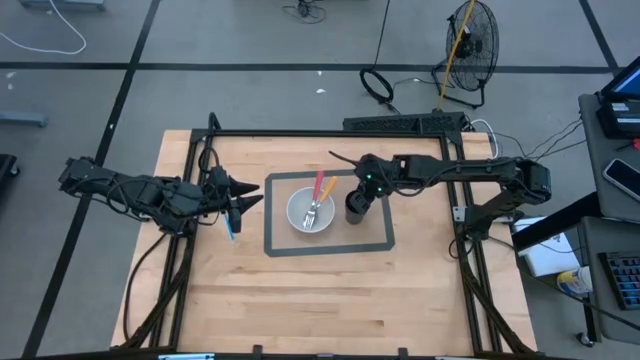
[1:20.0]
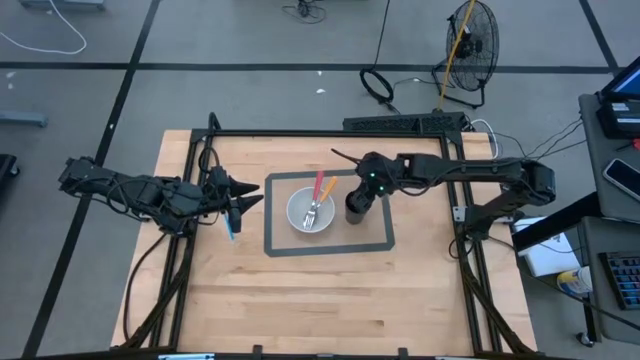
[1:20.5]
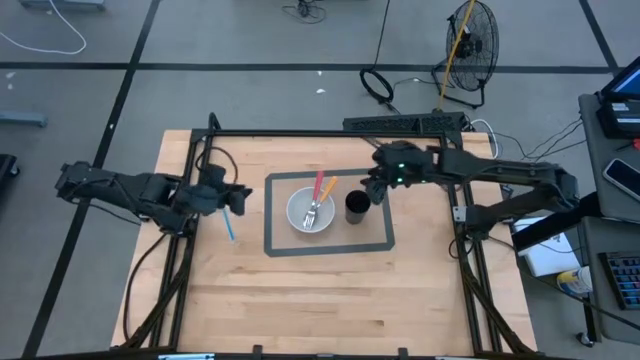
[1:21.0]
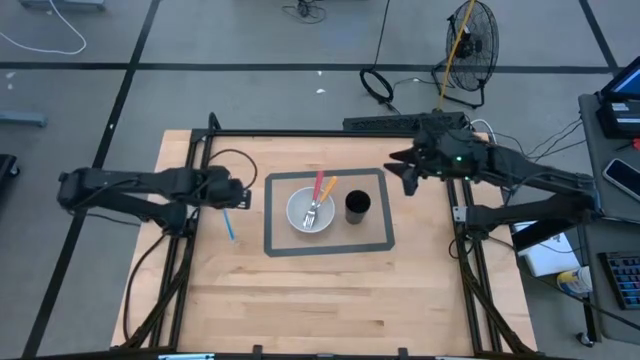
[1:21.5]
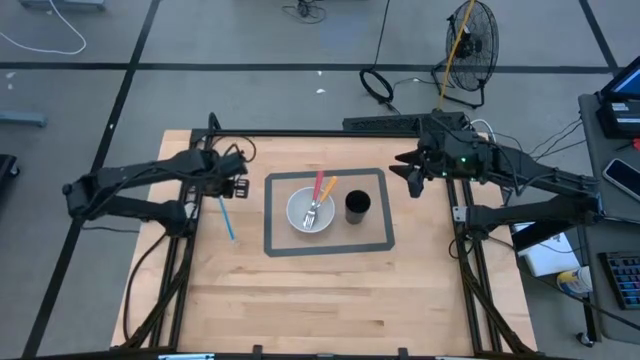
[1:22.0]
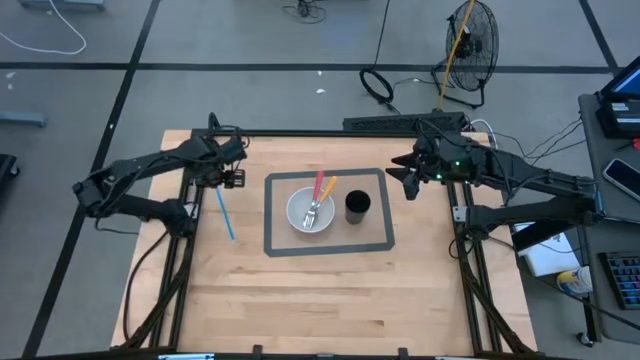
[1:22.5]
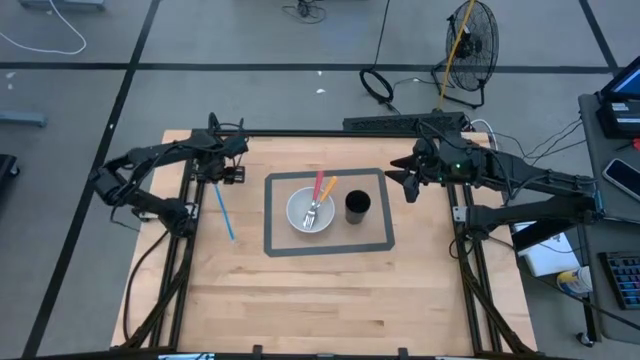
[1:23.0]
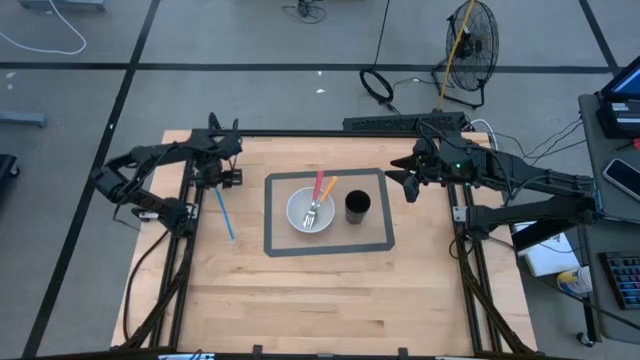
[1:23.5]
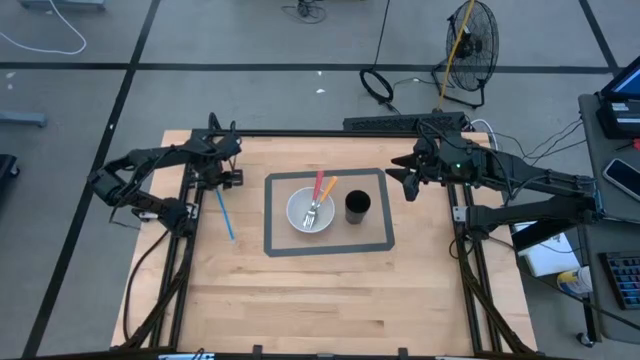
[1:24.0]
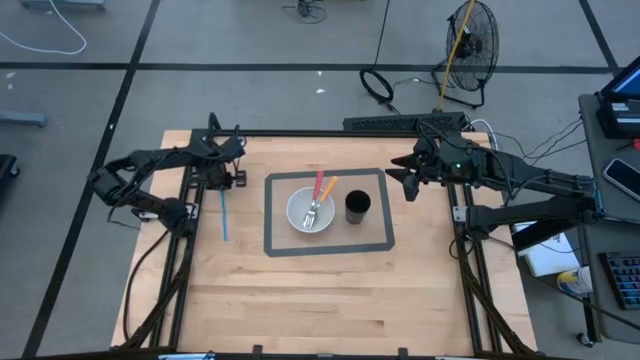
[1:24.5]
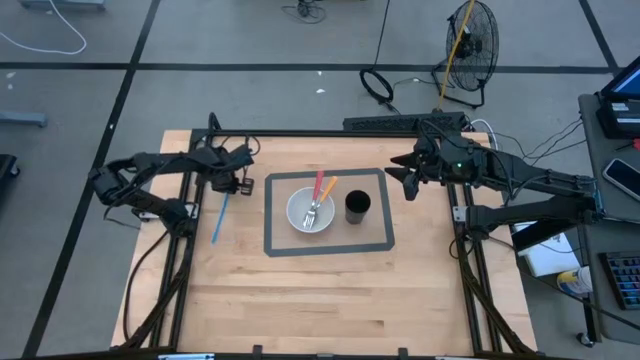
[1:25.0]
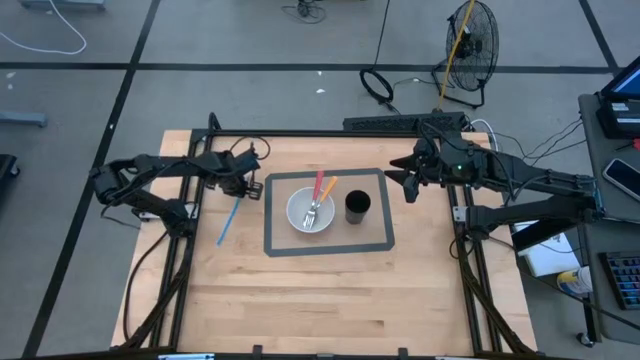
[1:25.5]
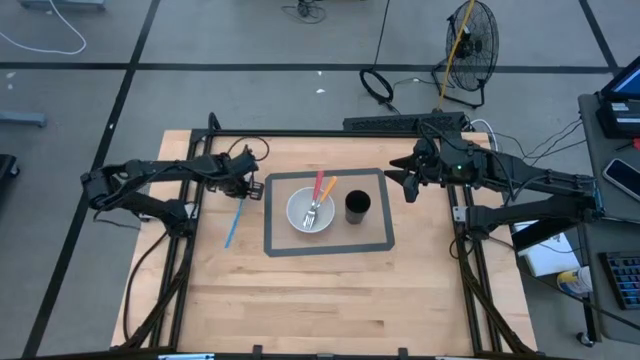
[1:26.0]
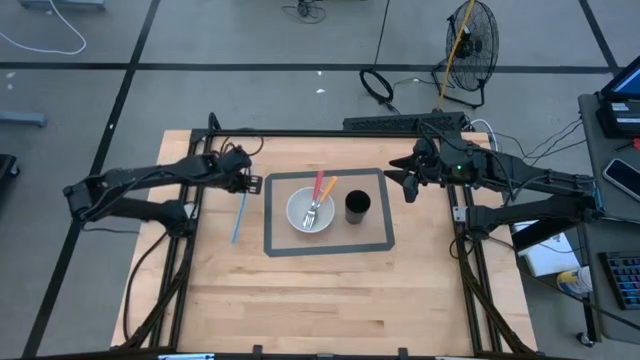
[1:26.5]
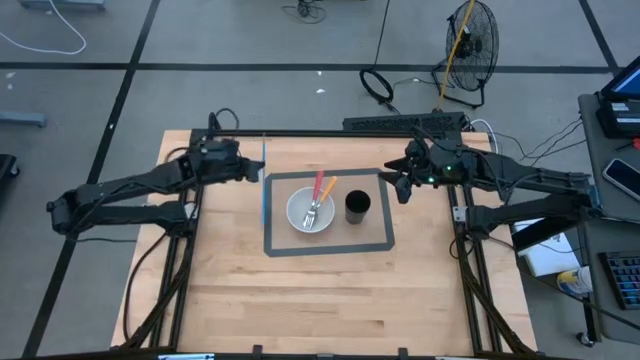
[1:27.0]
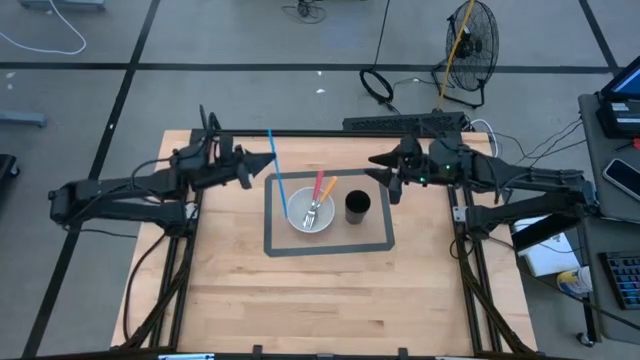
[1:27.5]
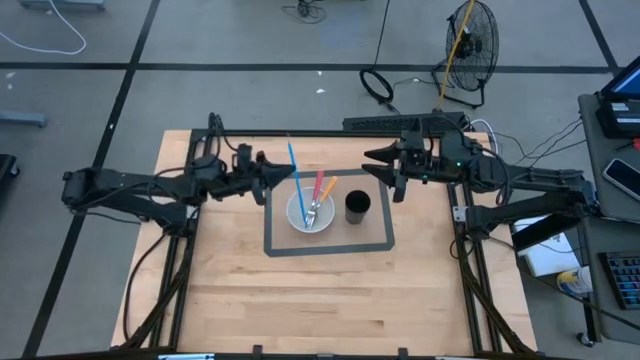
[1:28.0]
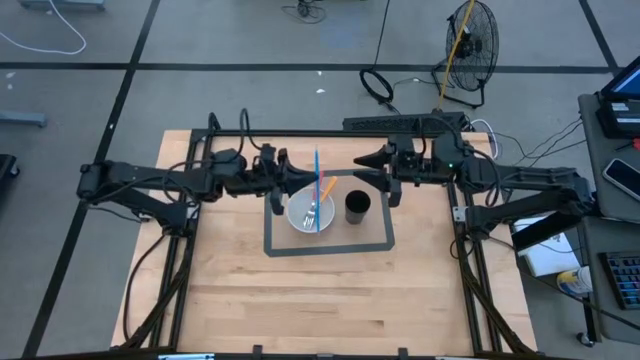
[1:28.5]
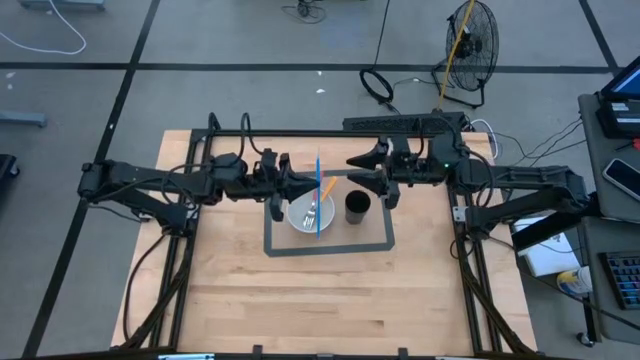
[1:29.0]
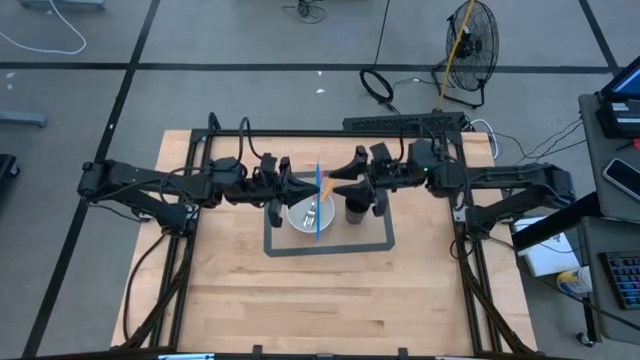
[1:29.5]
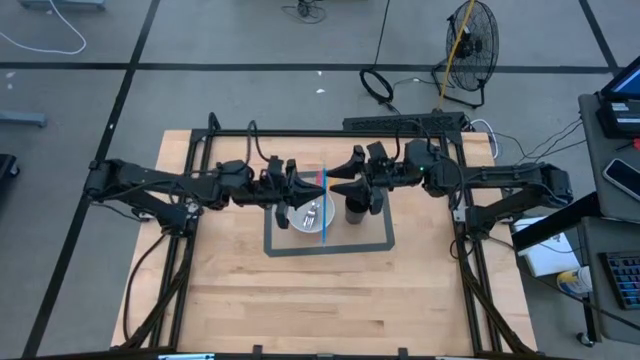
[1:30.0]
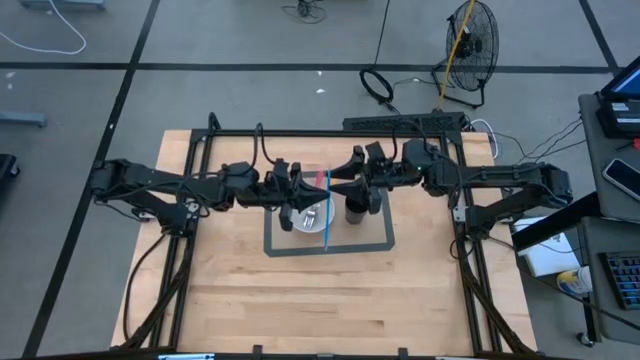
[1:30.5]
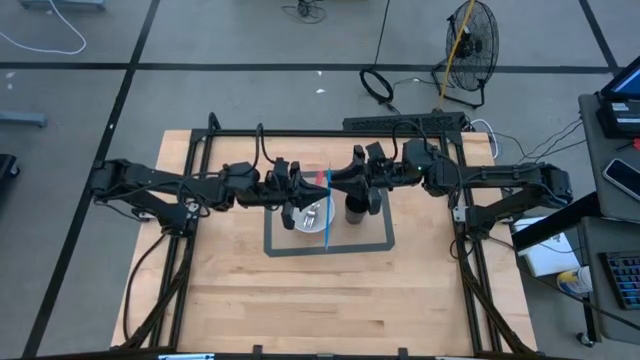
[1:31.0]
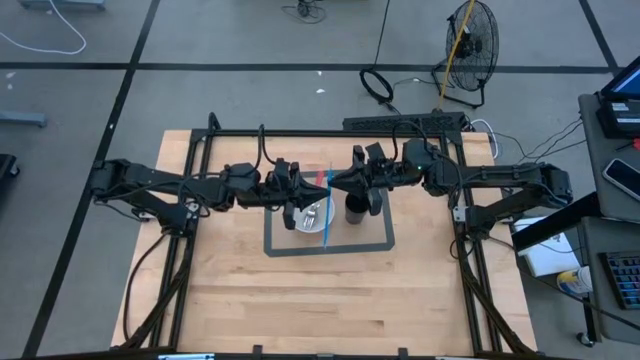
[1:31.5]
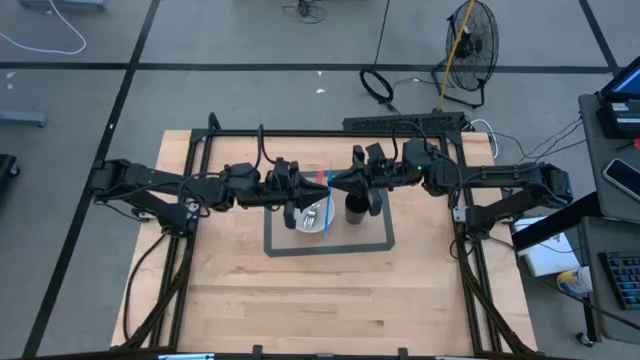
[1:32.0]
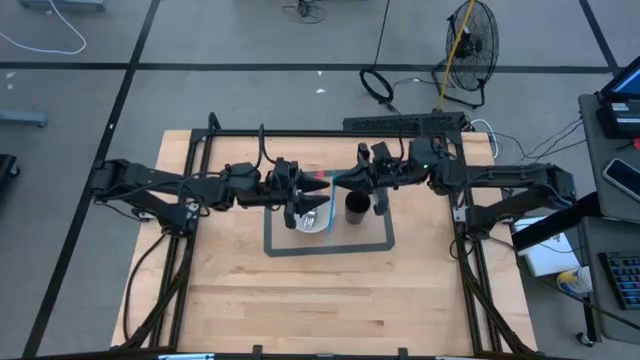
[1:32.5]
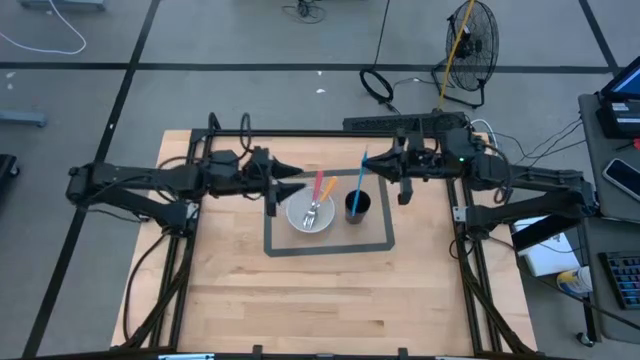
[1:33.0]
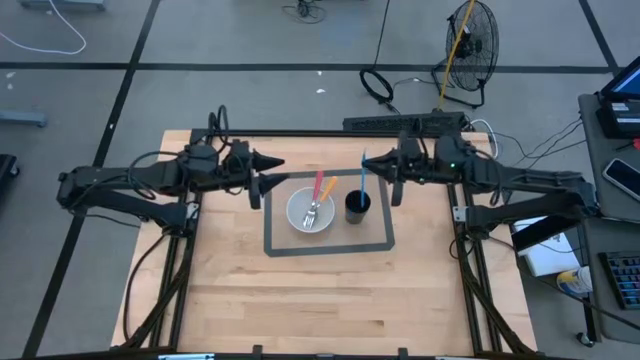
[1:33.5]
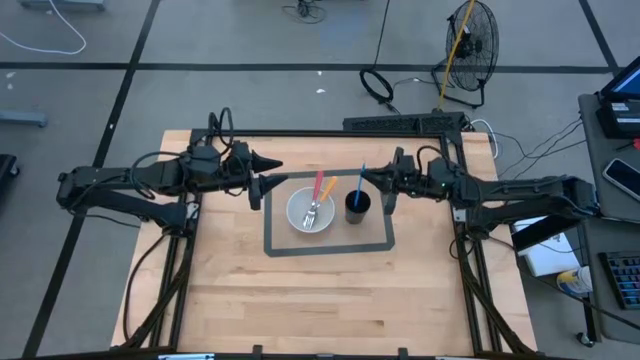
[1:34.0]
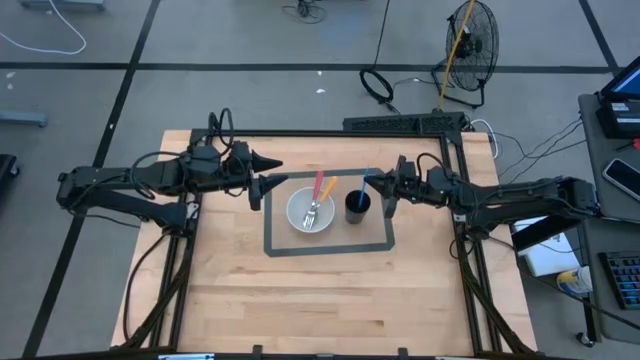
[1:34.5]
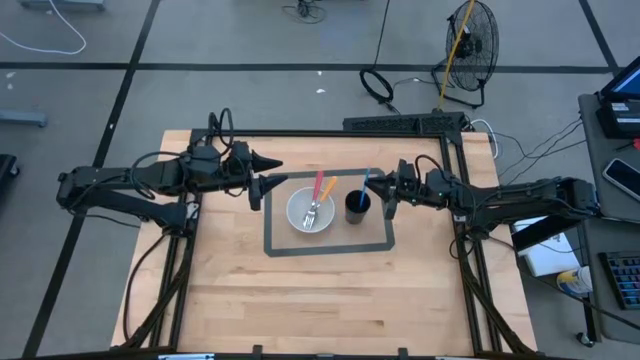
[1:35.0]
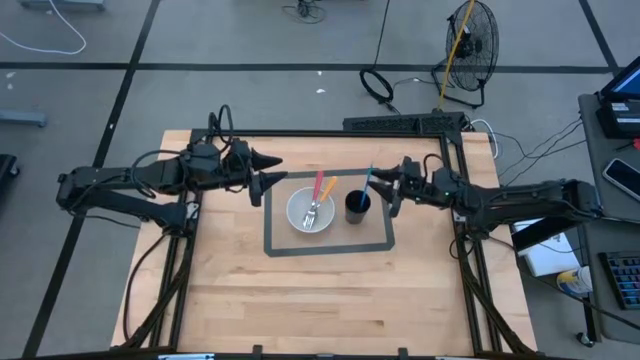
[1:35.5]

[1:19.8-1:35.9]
Task: Pick & Place Utensil
Put the blue straw into the black cup on the table mat

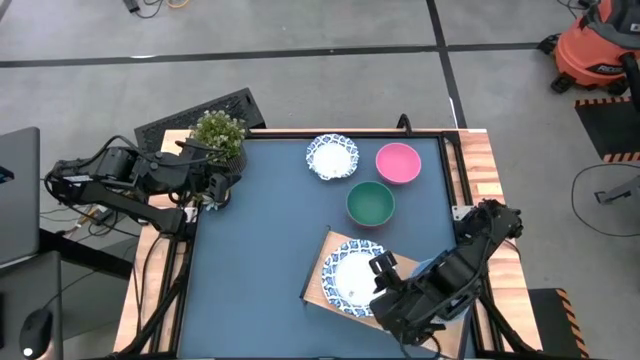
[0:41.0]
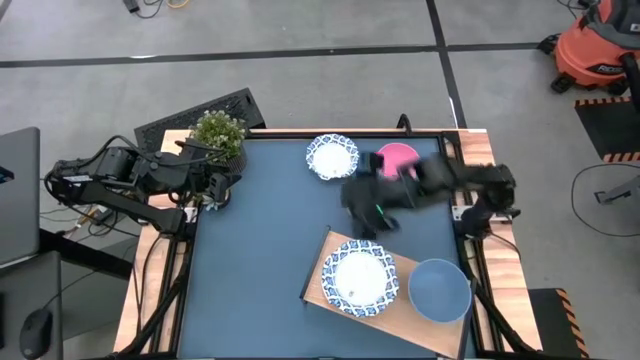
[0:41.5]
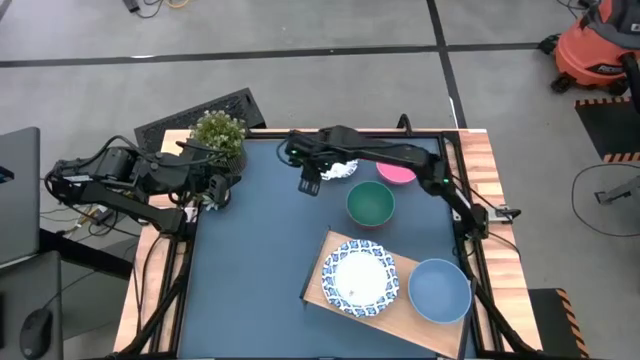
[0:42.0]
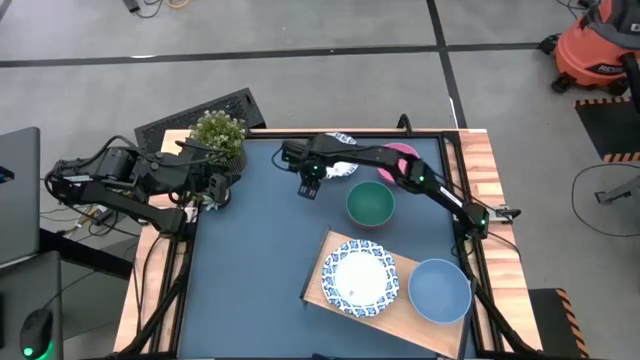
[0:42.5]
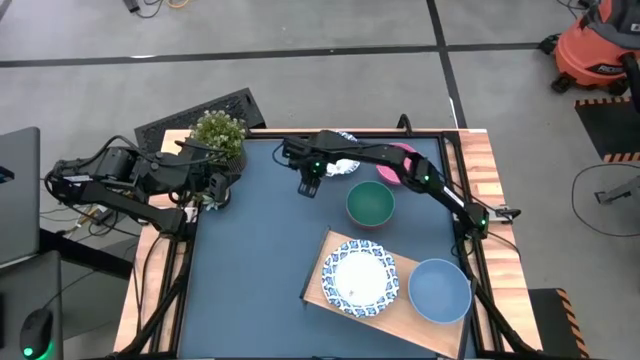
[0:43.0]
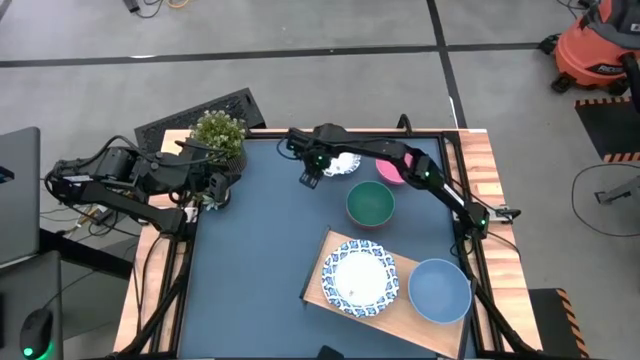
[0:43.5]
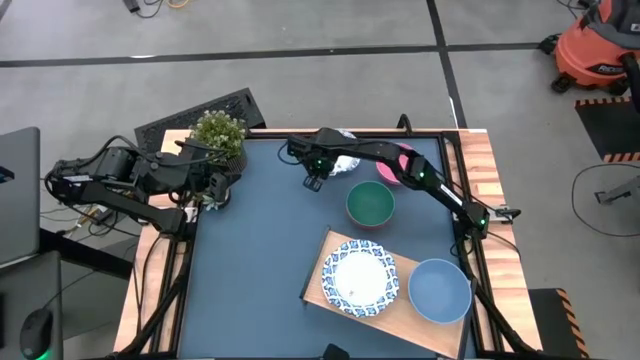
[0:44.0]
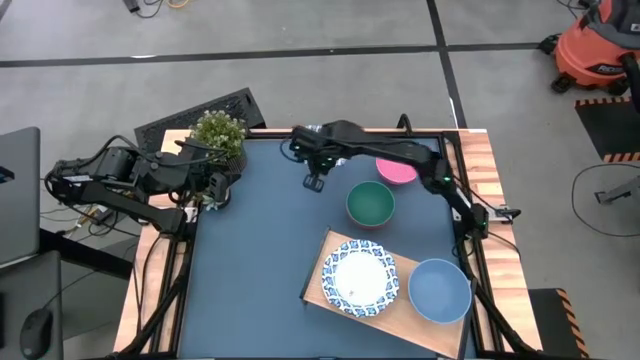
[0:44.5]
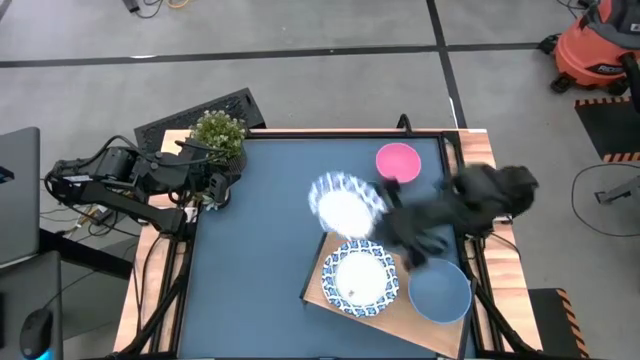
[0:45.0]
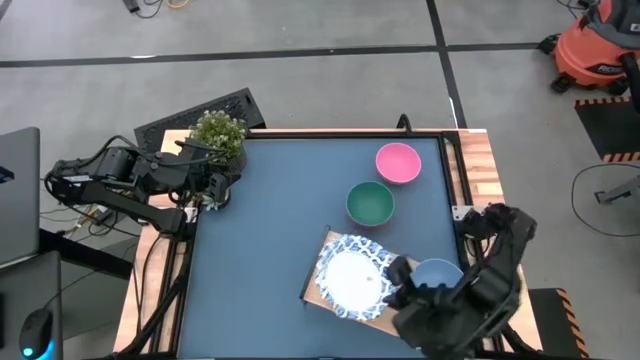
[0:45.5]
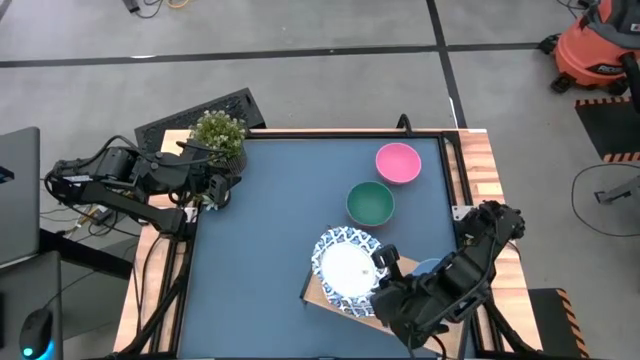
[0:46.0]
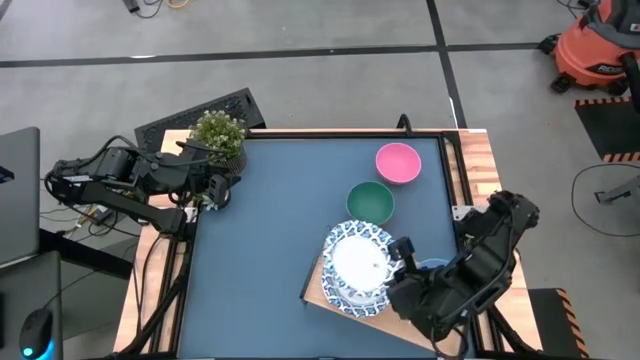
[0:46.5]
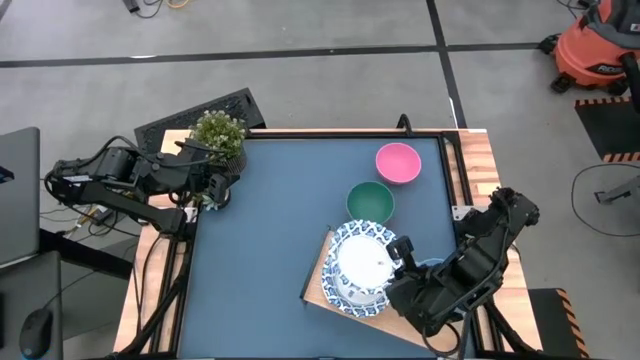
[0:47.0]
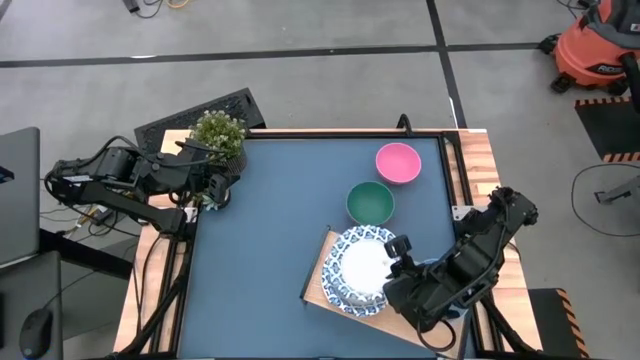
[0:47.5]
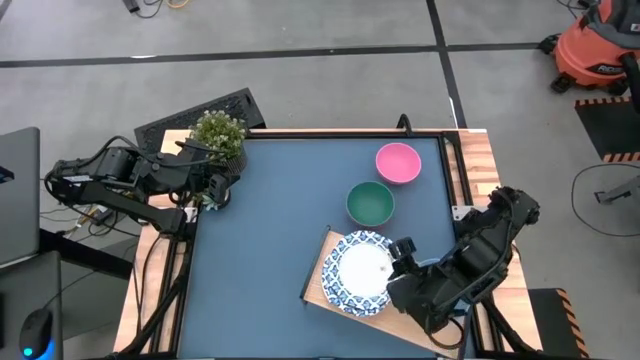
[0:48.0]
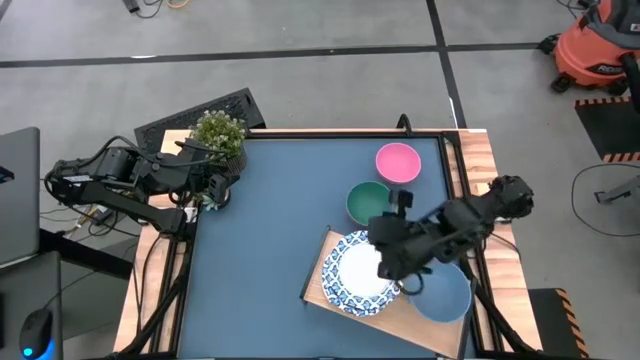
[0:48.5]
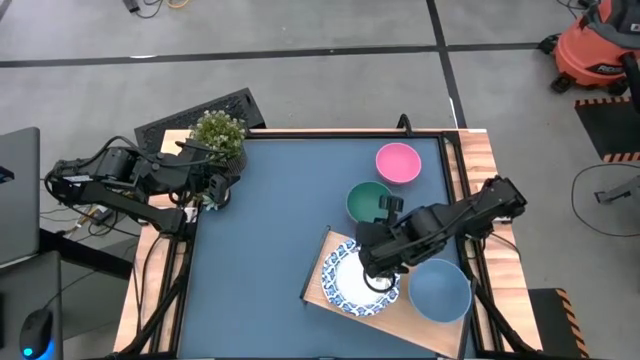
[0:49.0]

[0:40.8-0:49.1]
Task: Place and stack bowls onto a shelf
Stack the white bowl on top of the white bowl on the shelf
